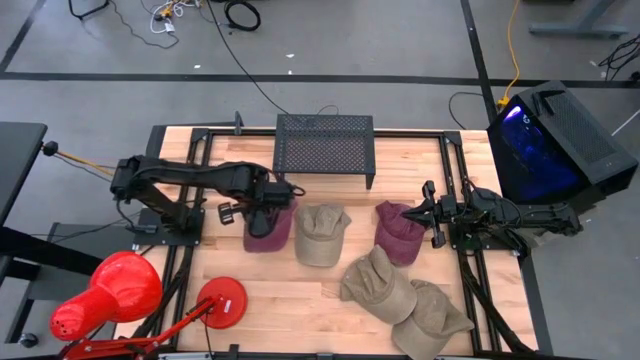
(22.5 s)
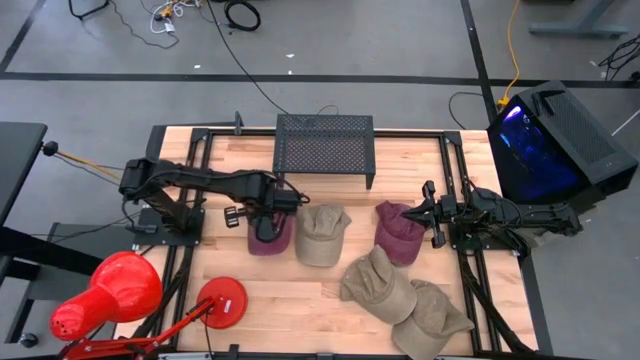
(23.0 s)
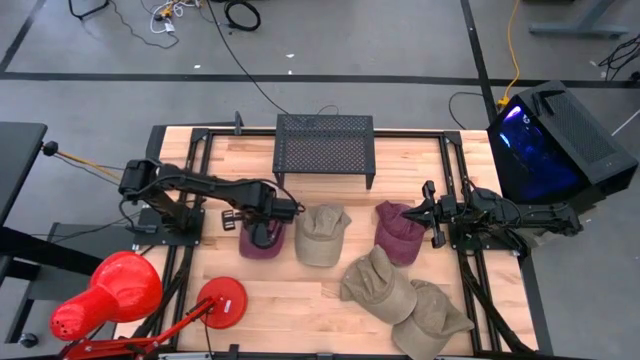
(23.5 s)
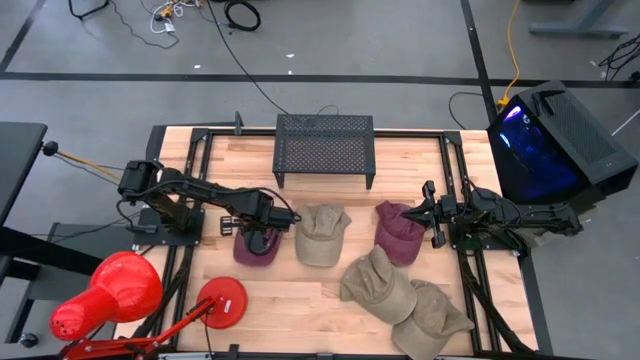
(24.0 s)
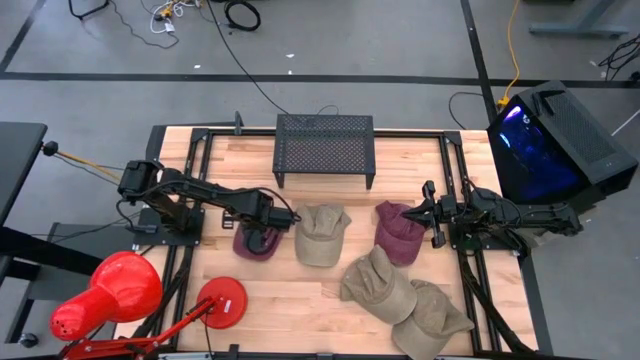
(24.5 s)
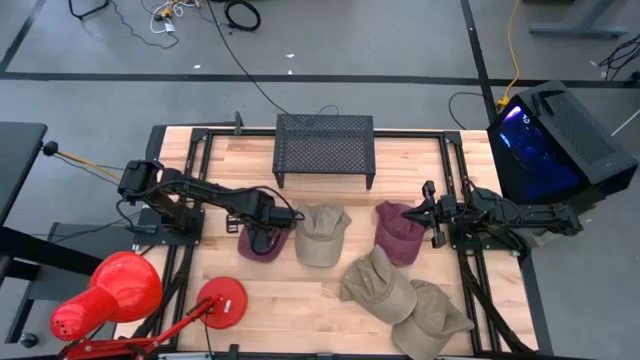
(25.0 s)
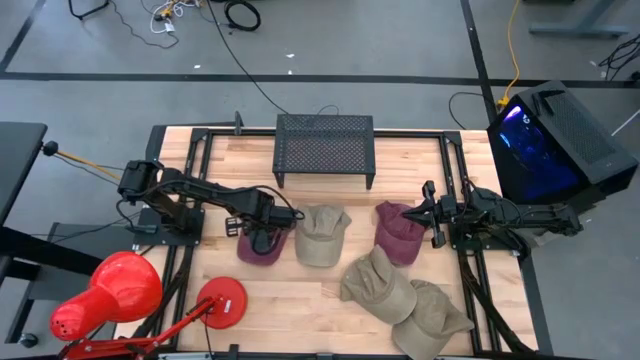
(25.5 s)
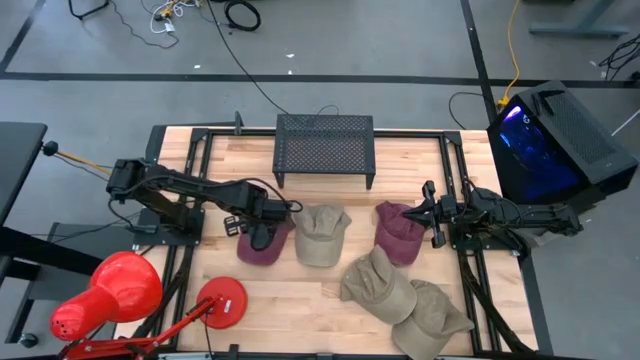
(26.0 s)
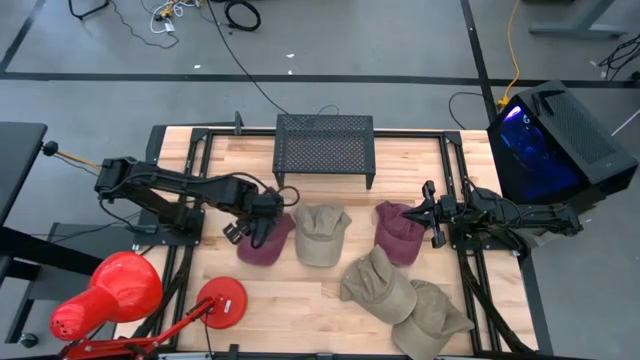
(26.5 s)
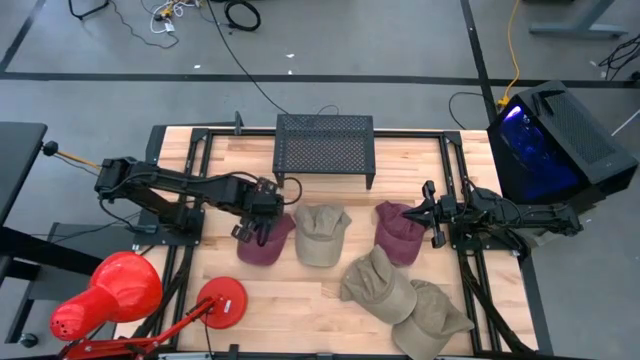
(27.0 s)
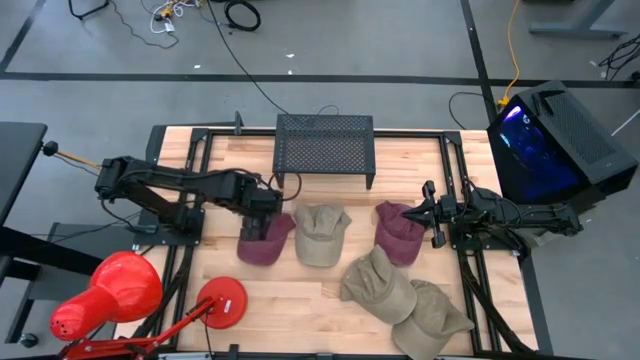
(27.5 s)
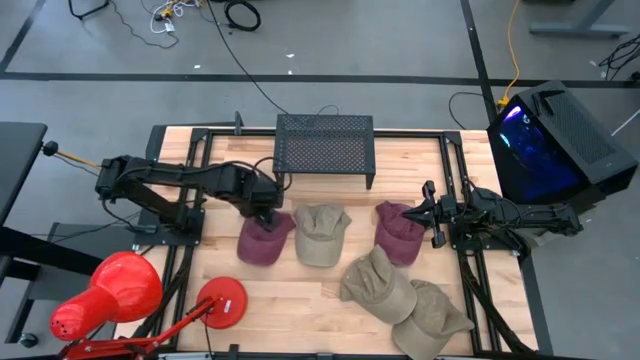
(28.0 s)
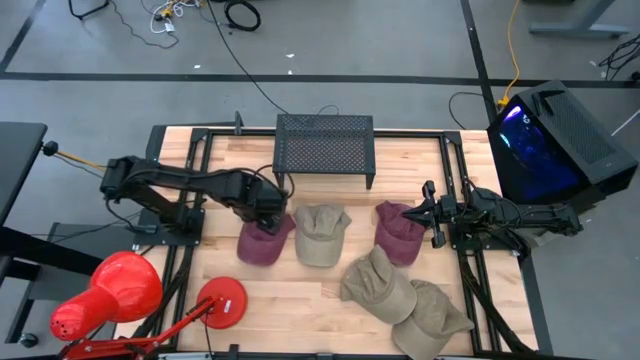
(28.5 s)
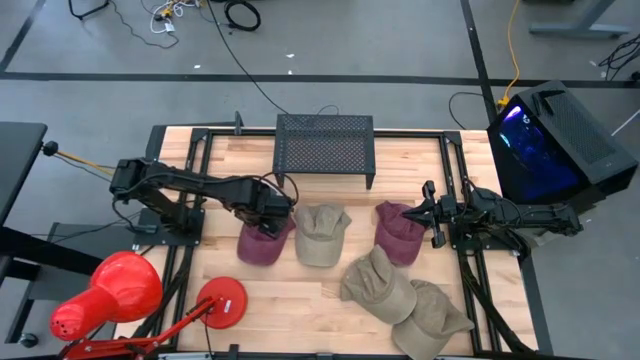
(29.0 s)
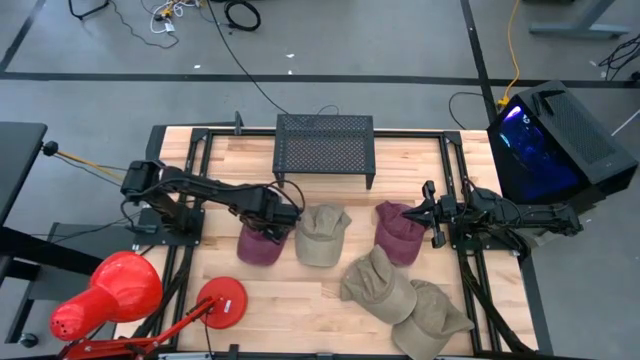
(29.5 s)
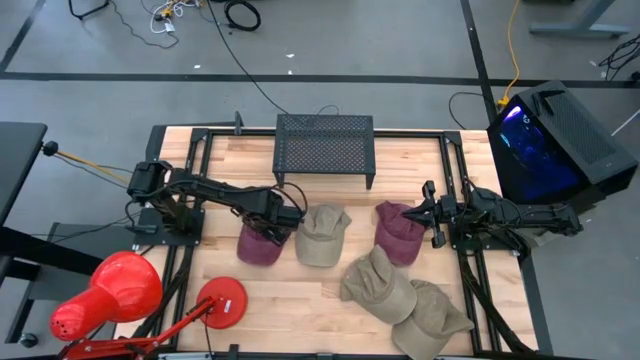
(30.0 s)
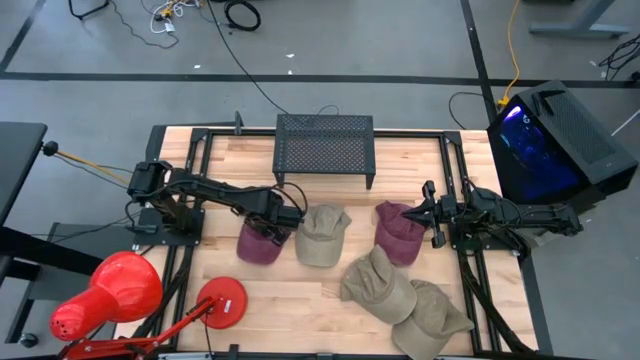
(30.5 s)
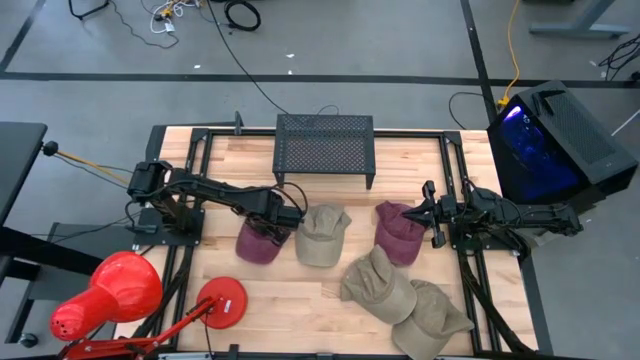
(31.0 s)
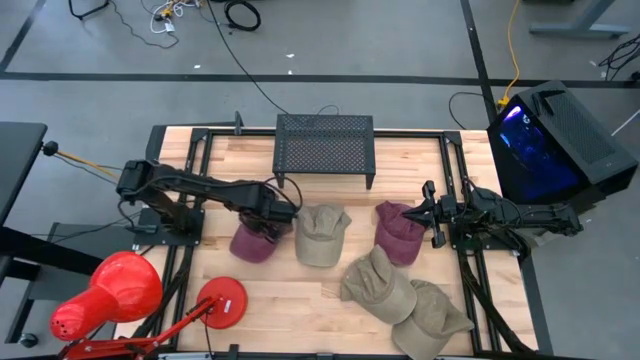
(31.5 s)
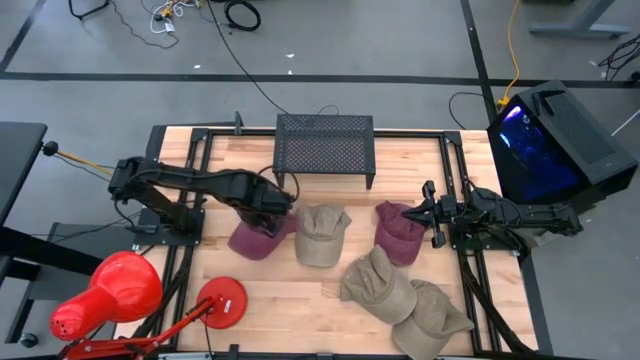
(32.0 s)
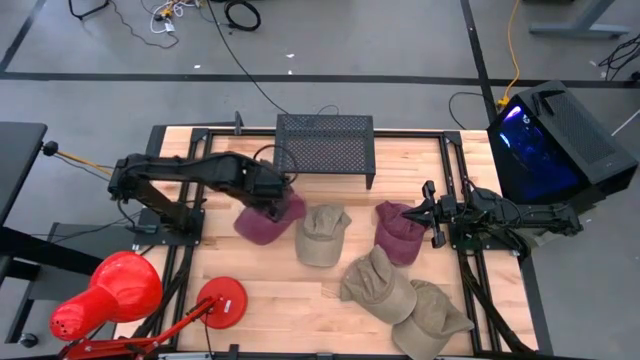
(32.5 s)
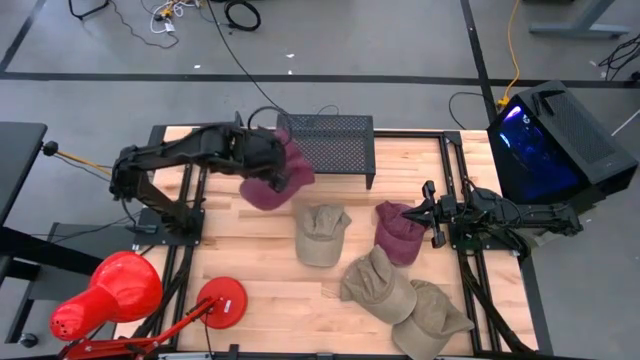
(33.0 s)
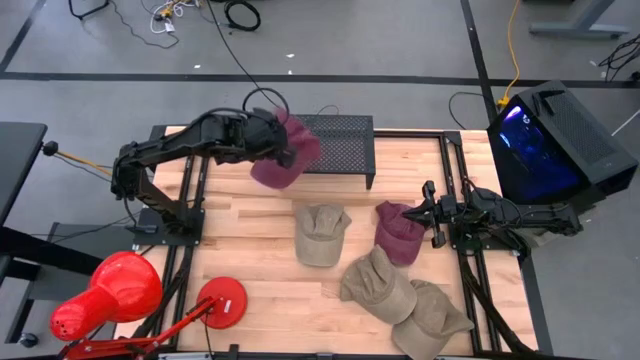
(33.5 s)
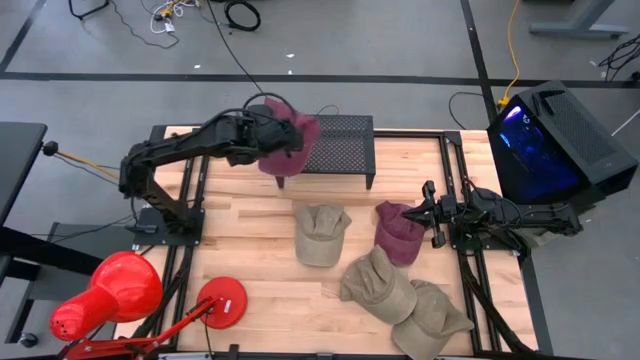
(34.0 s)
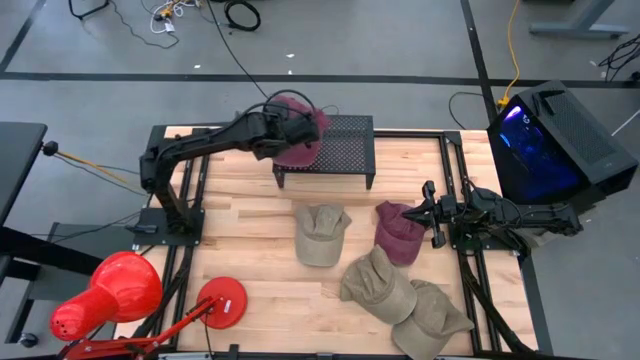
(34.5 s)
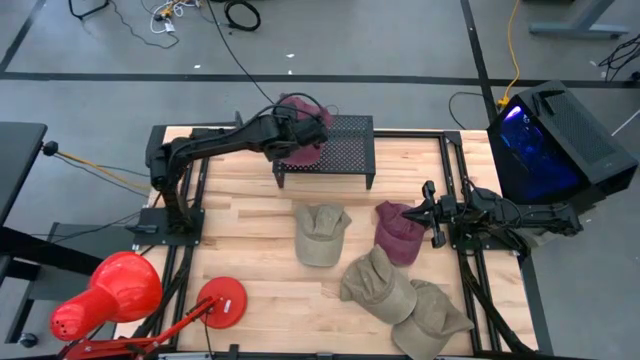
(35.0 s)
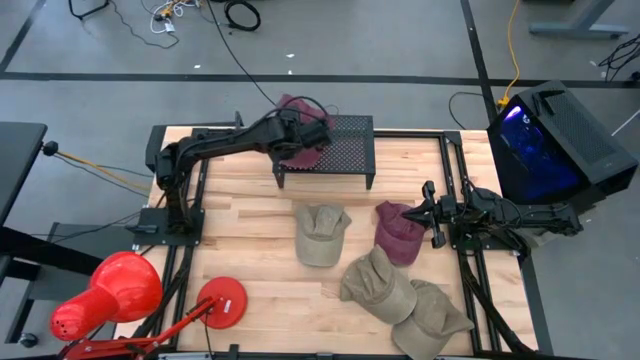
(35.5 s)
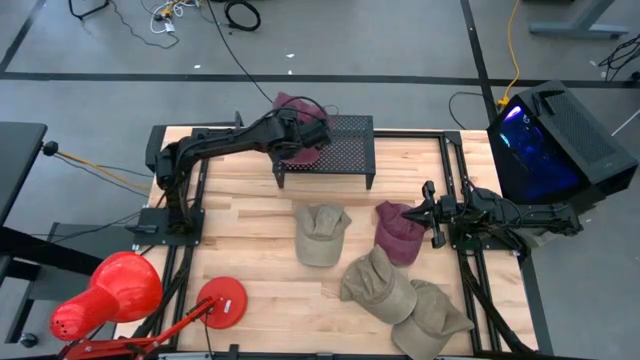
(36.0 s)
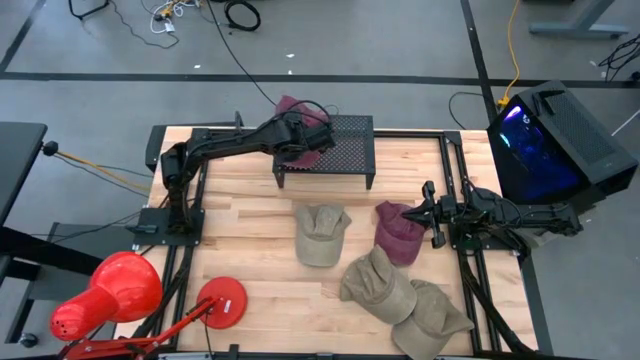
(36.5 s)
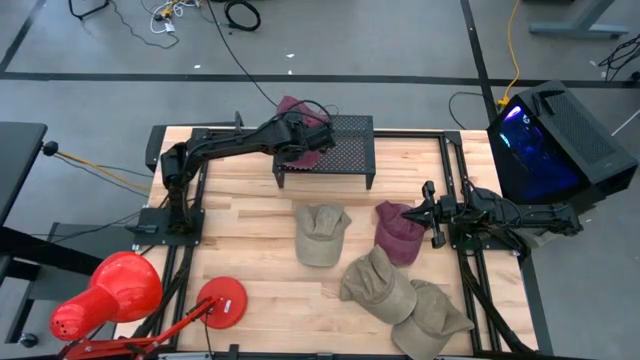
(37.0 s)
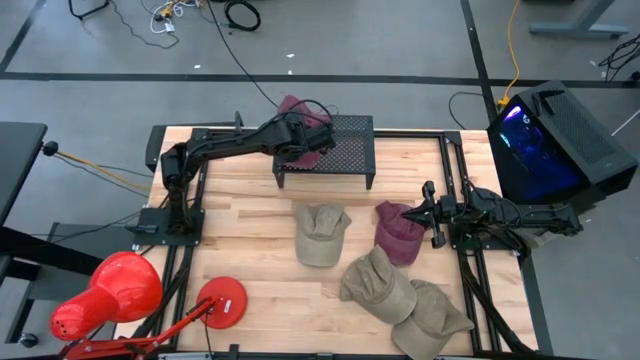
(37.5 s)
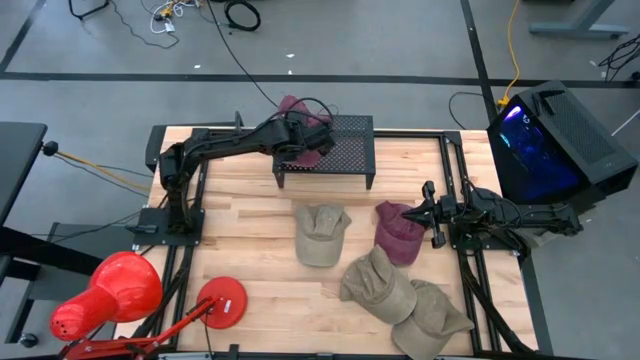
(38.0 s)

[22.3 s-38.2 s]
Task: Pick & Place hat
Put the left red cap on the shelf

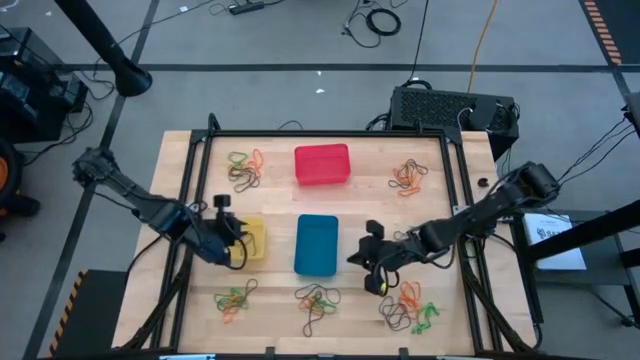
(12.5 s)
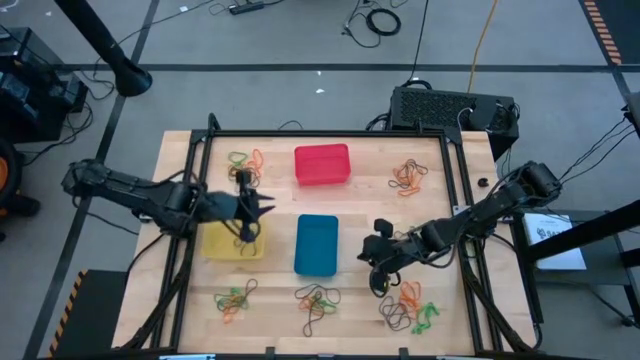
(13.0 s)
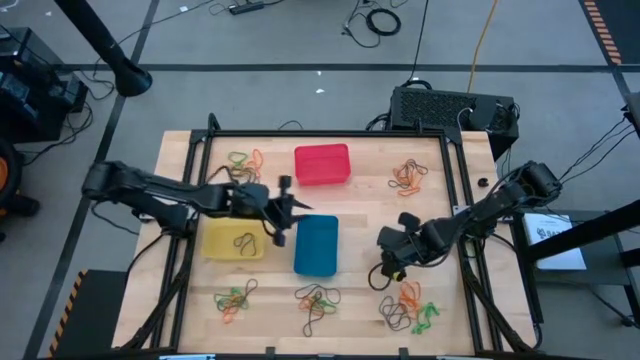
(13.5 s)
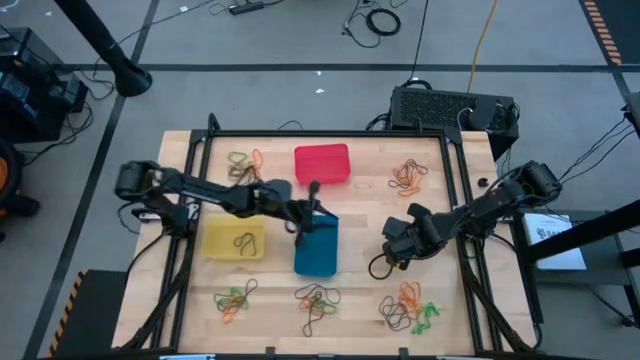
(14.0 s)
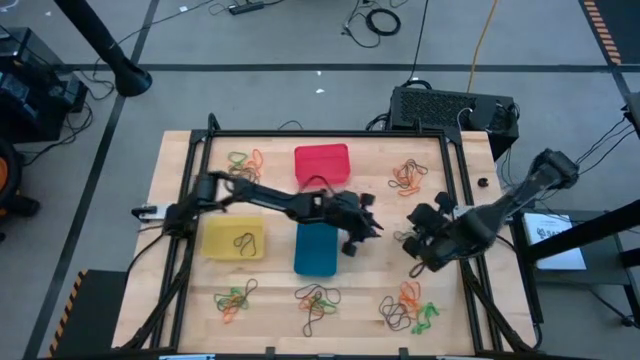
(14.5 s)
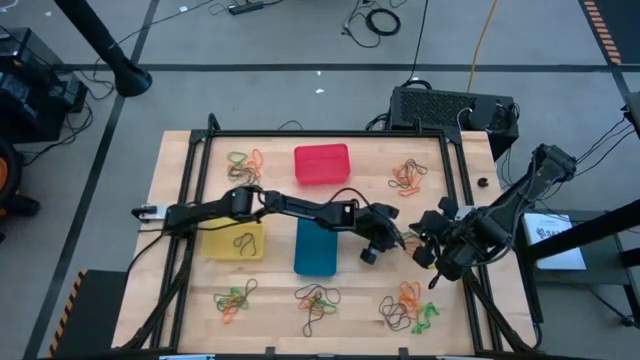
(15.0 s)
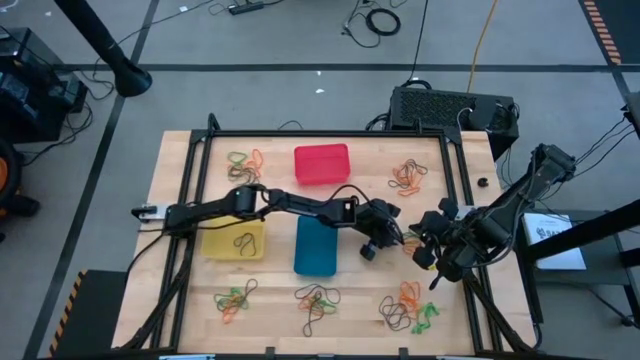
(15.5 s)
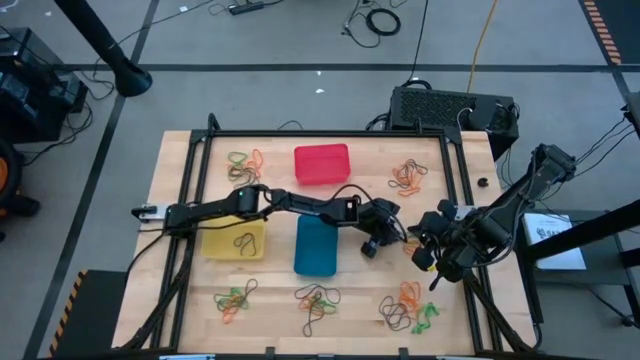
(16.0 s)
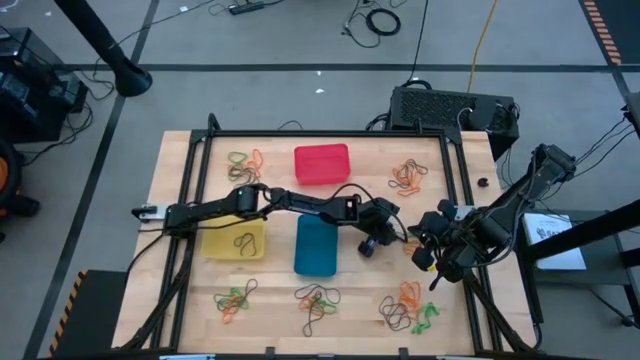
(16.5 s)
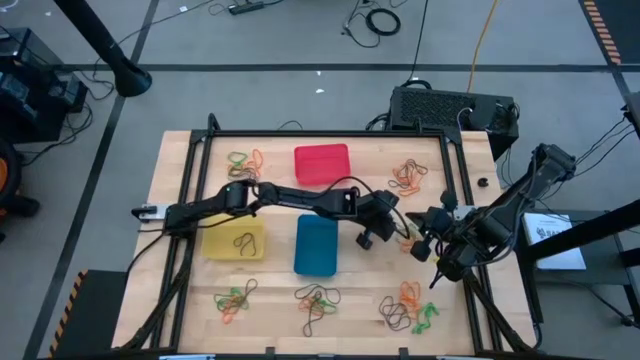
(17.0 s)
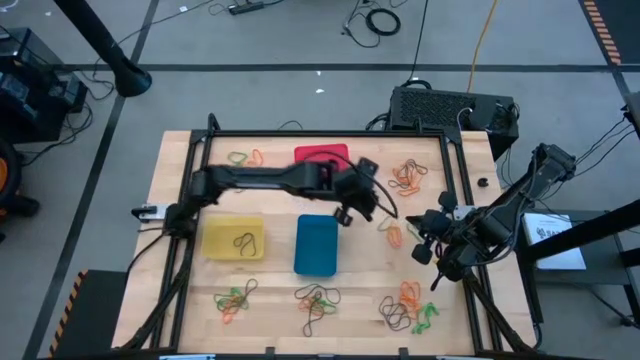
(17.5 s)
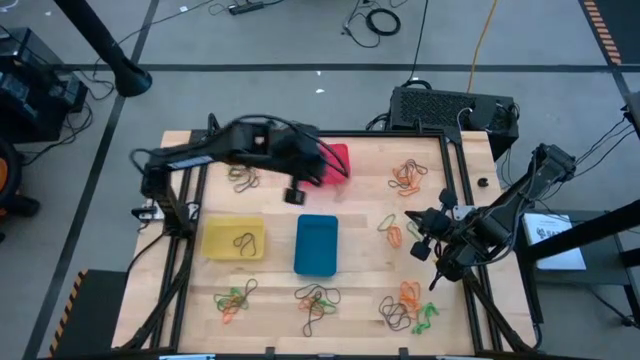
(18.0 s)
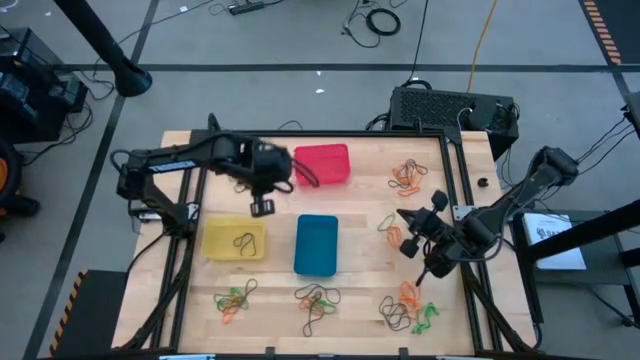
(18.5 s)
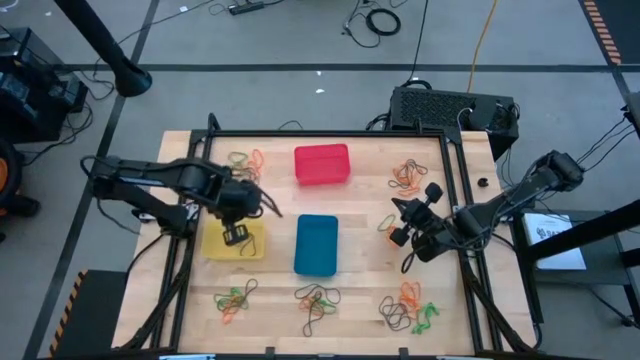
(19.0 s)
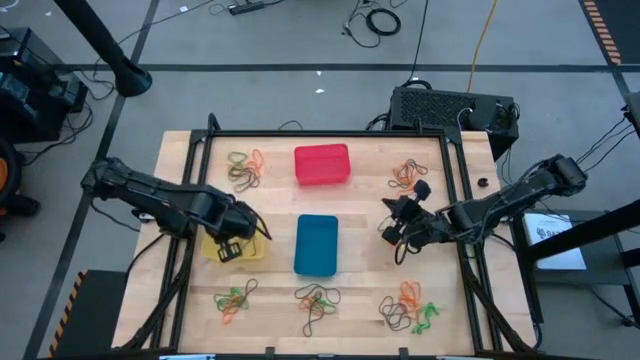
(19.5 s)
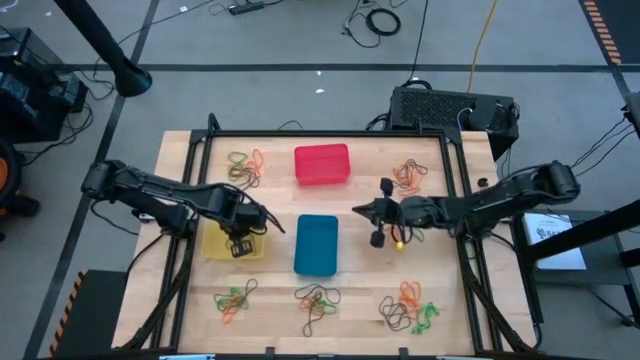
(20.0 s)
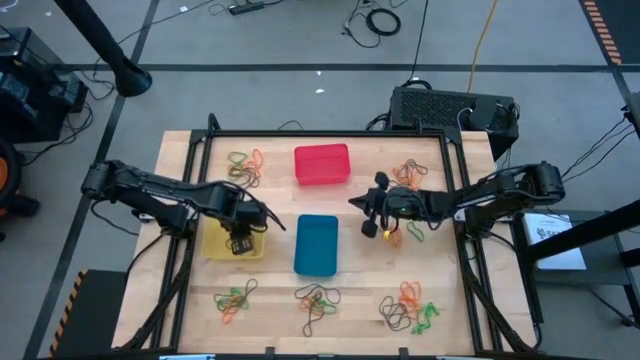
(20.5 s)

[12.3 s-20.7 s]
Task: Sort rubber bands into baskets
Put the purple rubber band into the yellow bin
